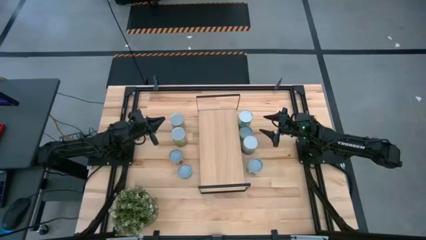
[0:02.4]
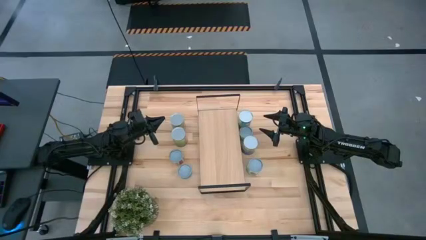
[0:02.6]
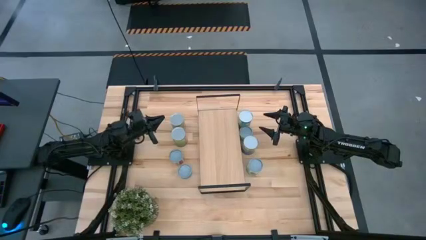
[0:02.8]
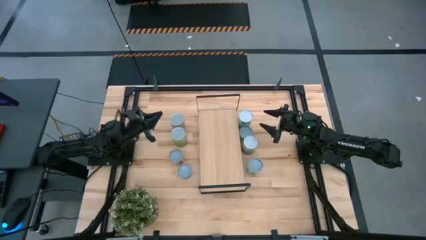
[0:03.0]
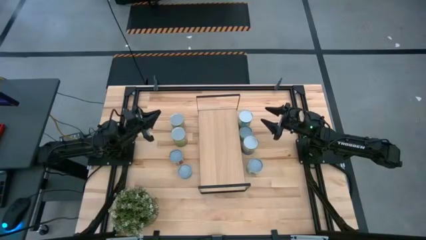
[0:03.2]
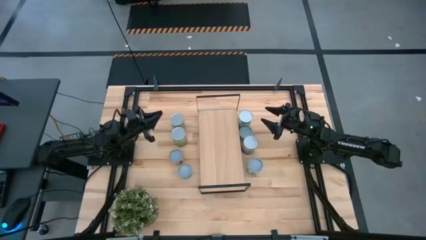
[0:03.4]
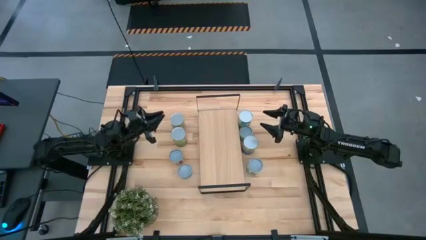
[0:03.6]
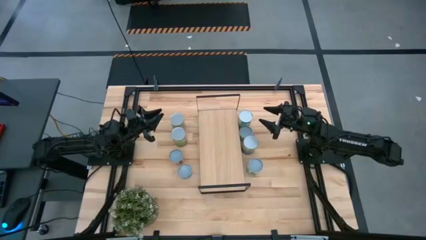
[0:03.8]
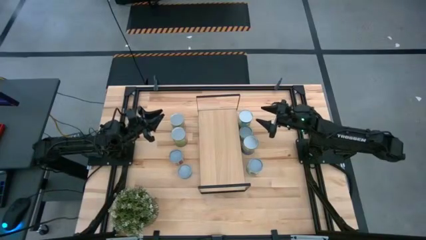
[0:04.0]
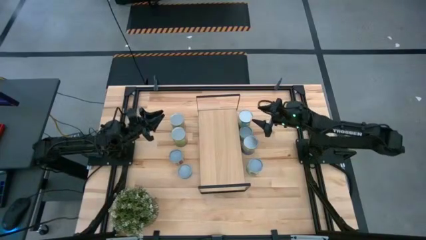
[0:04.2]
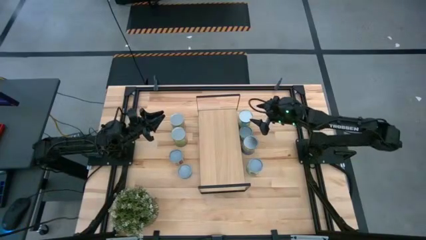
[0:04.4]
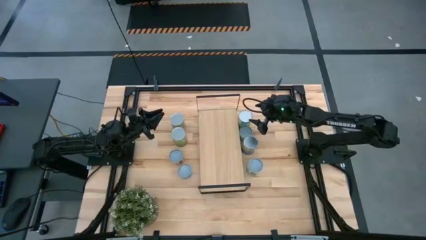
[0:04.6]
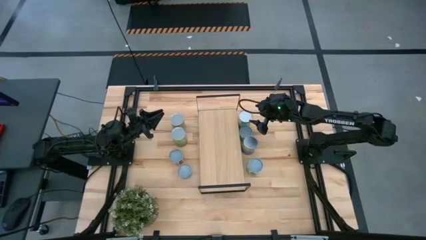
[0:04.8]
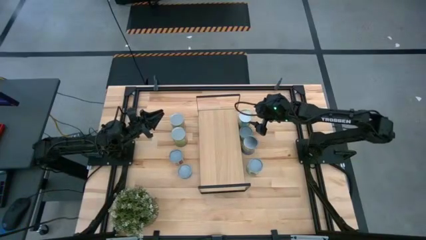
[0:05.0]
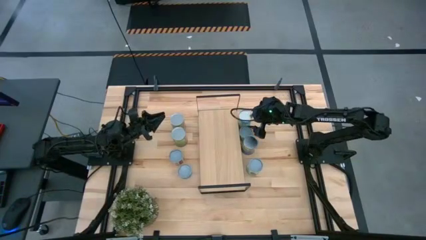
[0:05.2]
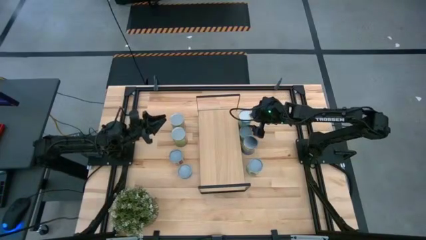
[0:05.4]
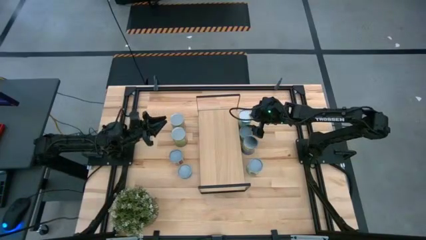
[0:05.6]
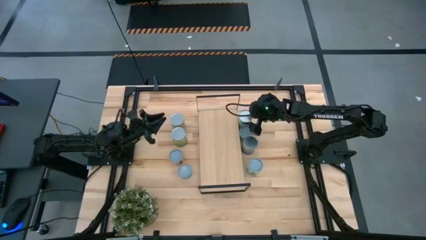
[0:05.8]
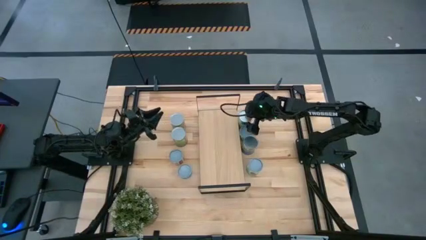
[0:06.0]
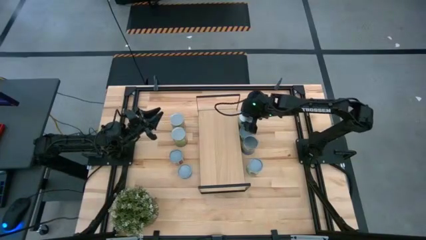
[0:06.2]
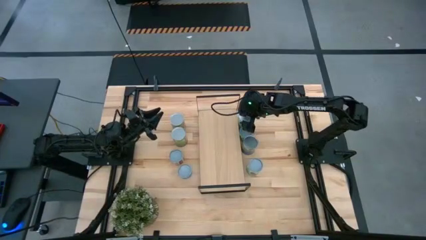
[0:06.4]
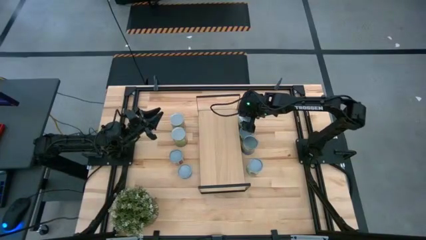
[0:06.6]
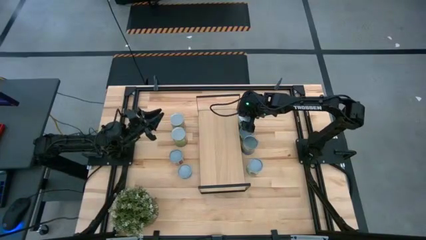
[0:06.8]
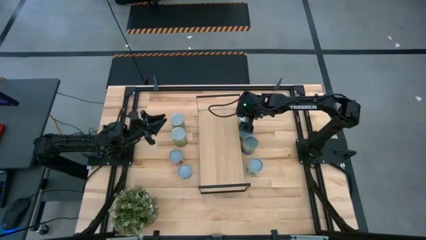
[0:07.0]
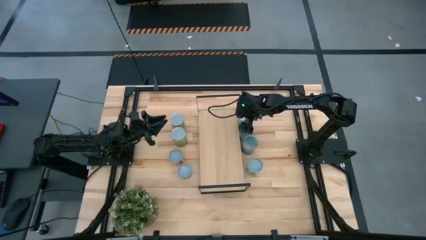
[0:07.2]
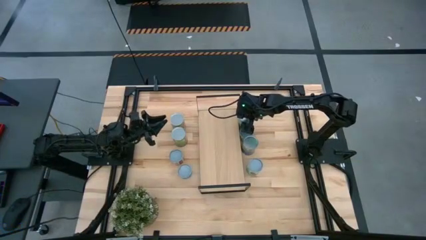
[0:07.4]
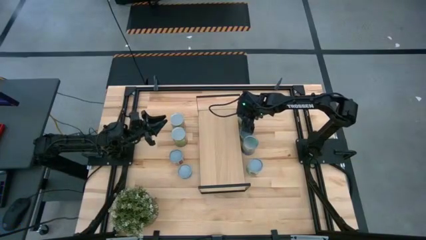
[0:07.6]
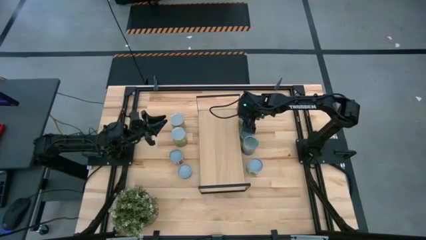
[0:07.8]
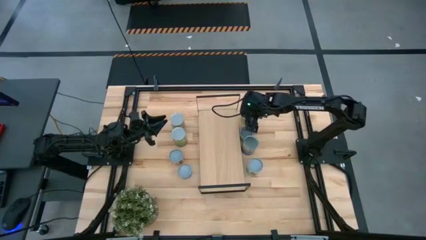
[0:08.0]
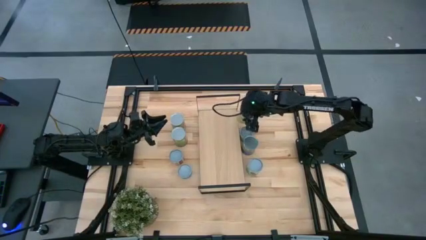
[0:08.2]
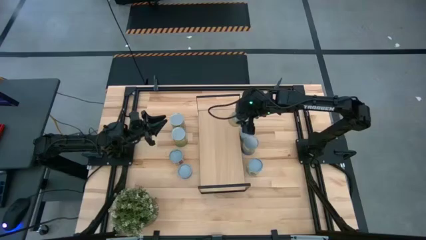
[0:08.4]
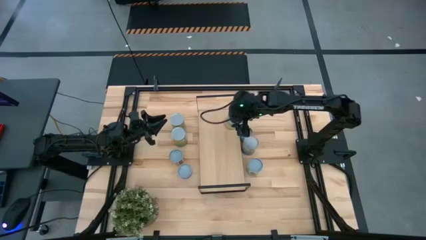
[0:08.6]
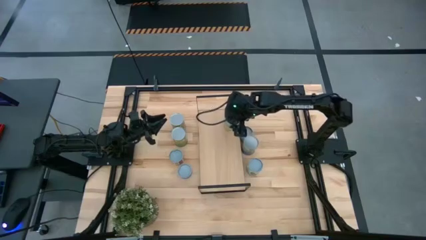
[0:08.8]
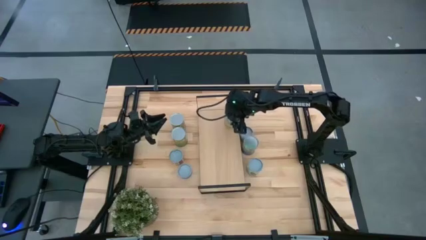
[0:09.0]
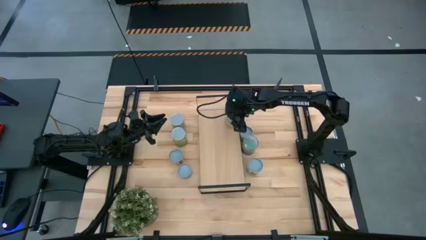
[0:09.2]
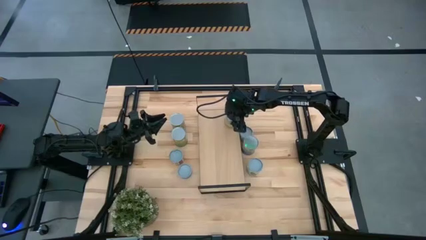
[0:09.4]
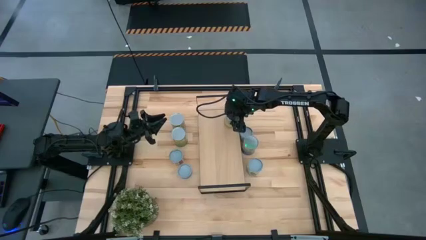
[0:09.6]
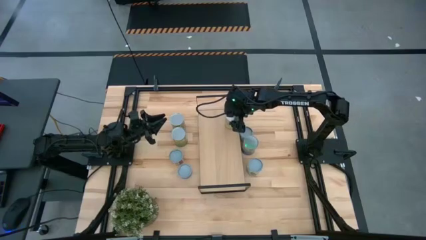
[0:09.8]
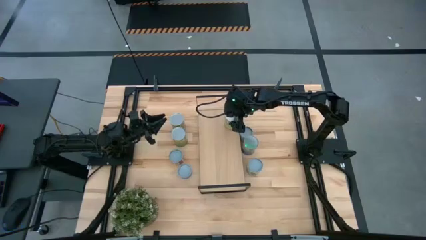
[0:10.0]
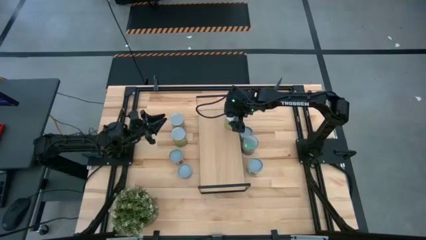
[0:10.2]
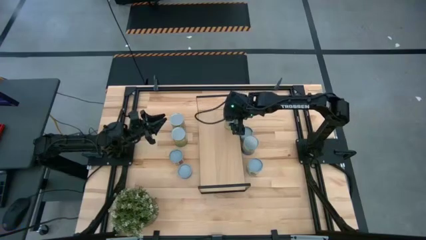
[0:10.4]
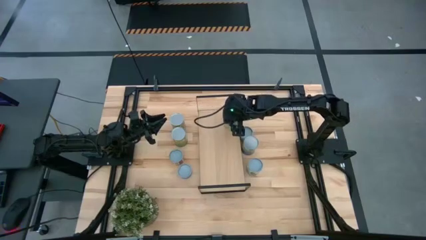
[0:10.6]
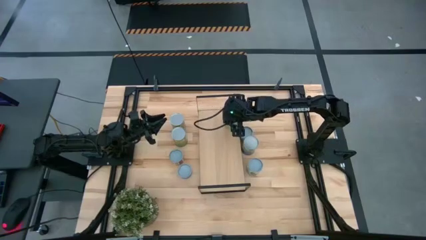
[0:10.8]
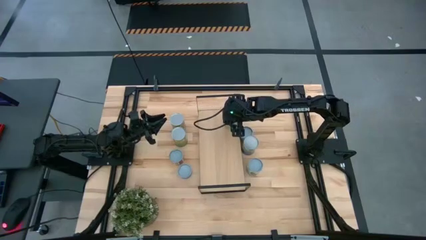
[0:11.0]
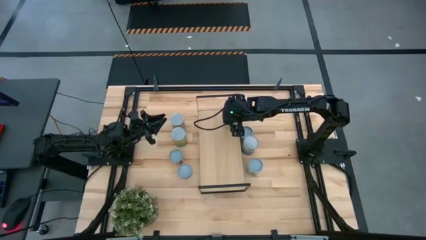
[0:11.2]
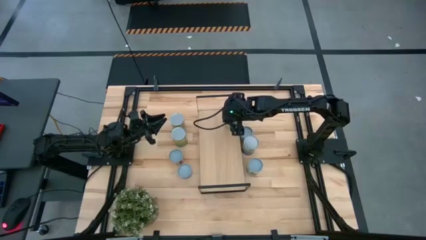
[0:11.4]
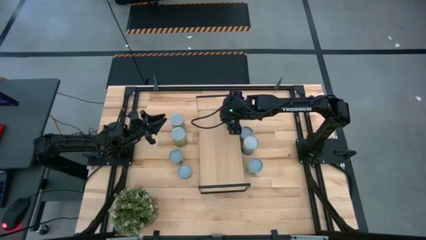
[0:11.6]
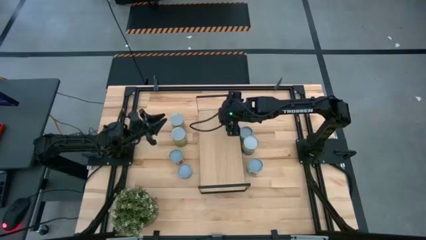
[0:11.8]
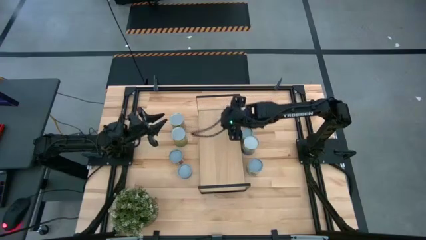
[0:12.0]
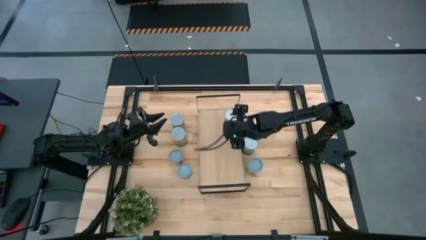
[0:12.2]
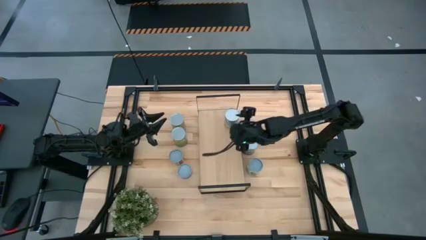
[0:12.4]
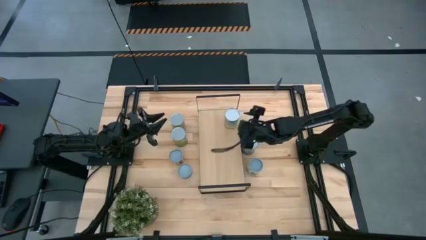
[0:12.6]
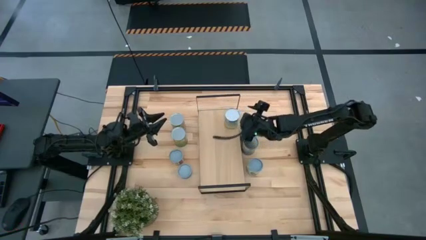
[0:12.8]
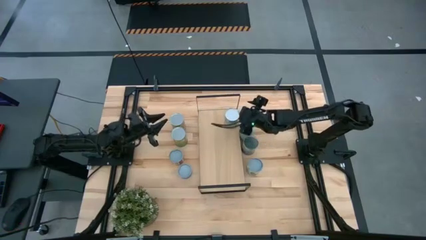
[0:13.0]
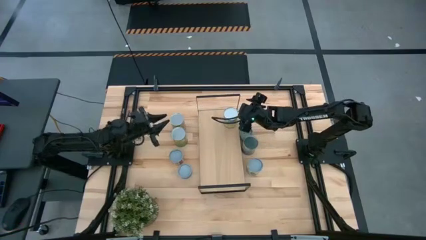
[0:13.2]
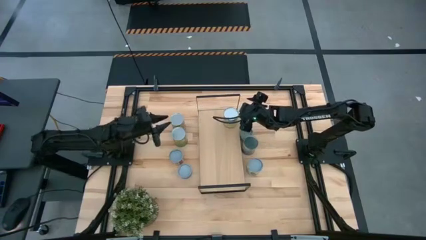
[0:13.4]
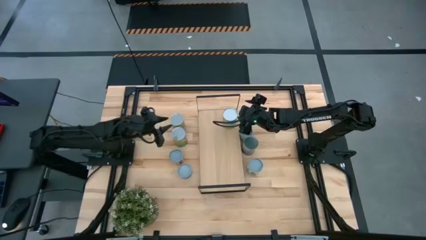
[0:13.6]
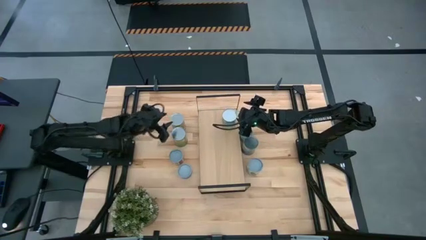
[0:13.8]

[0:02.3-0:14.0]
Task: Pick and place cans onto a shelf
Put the canned carrots on the shelf

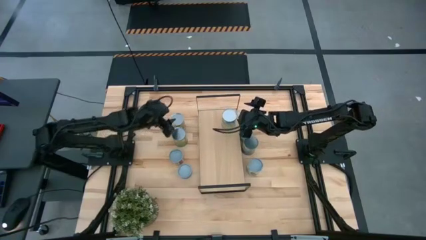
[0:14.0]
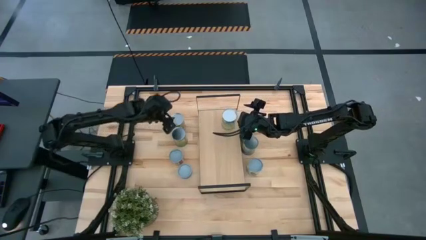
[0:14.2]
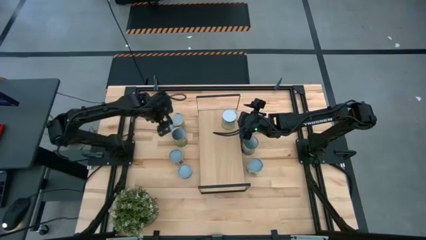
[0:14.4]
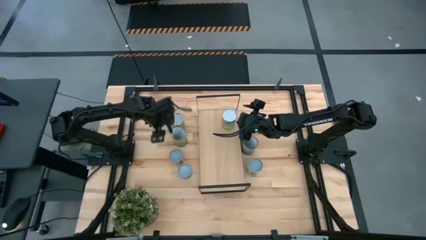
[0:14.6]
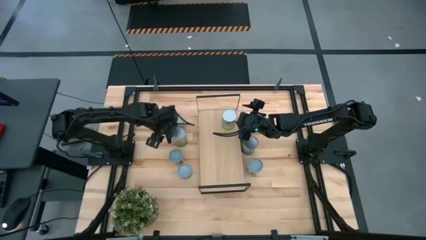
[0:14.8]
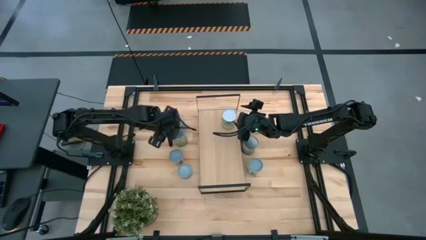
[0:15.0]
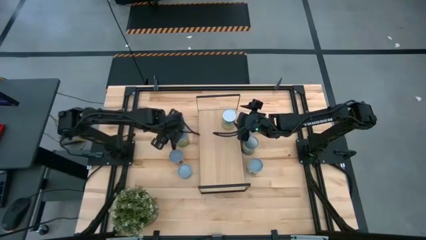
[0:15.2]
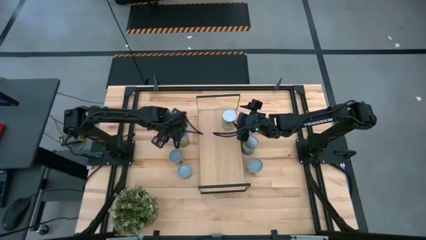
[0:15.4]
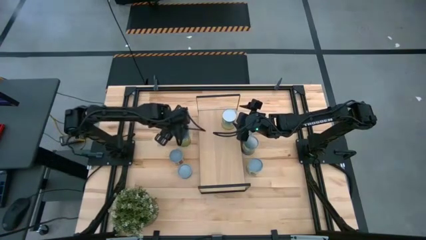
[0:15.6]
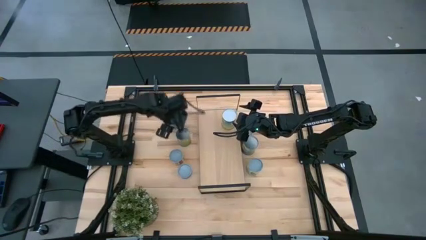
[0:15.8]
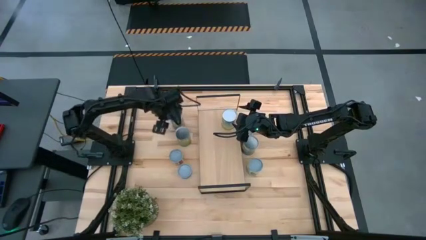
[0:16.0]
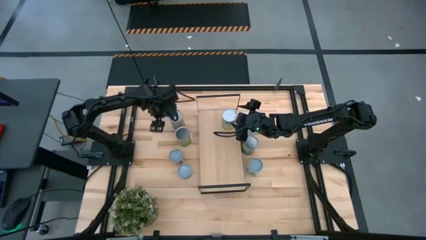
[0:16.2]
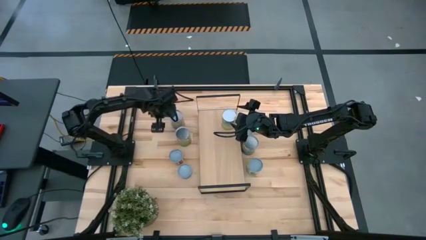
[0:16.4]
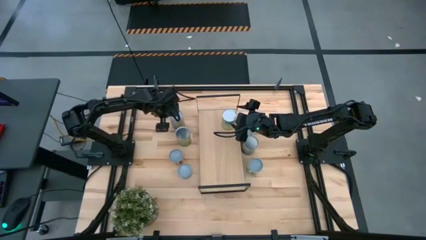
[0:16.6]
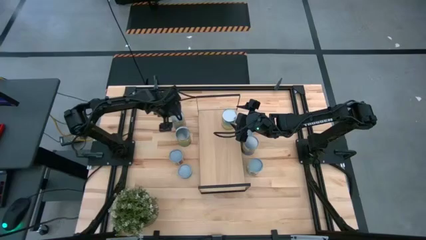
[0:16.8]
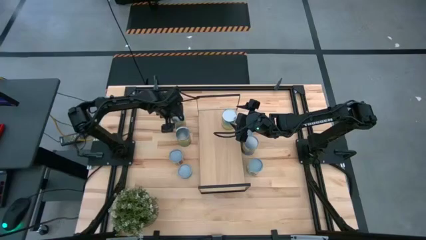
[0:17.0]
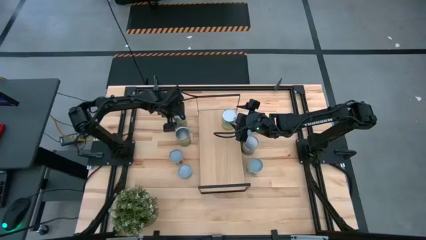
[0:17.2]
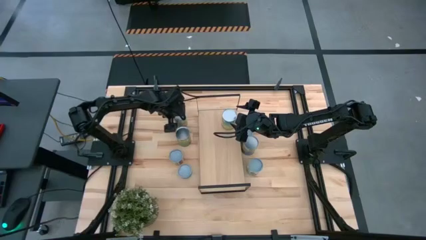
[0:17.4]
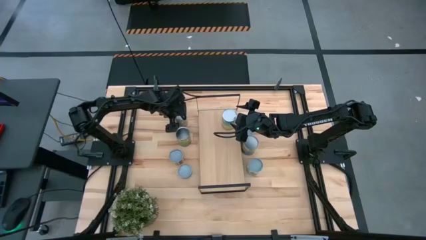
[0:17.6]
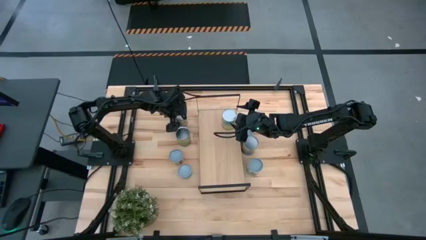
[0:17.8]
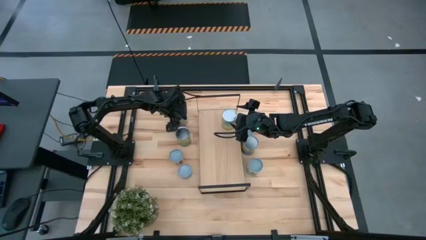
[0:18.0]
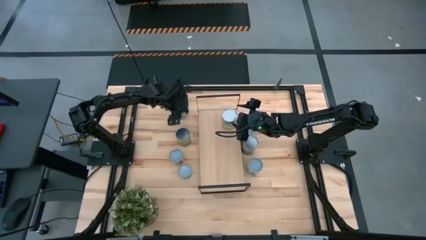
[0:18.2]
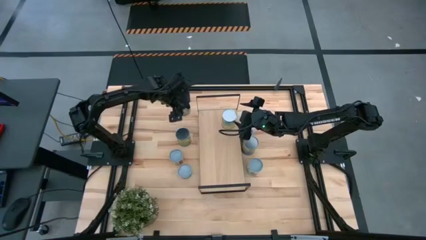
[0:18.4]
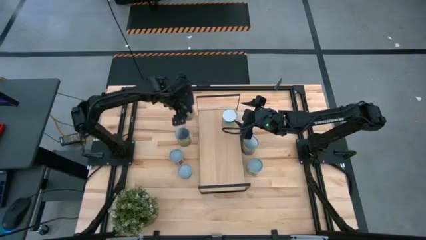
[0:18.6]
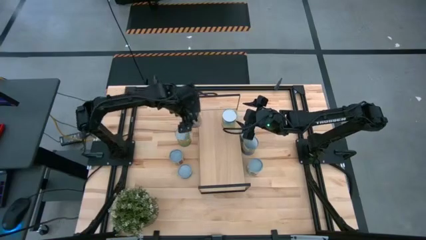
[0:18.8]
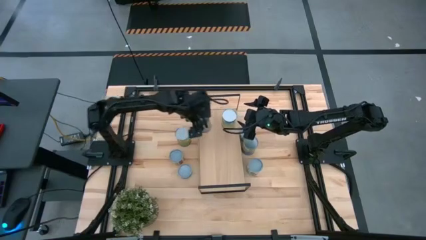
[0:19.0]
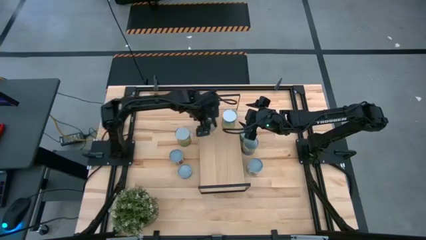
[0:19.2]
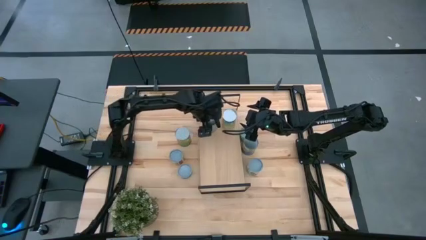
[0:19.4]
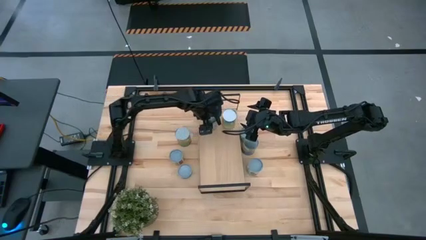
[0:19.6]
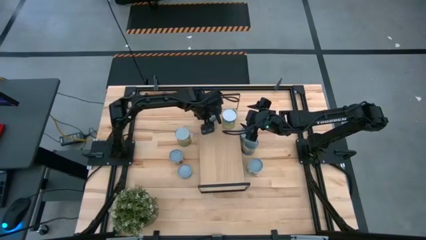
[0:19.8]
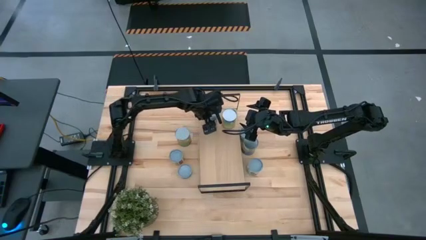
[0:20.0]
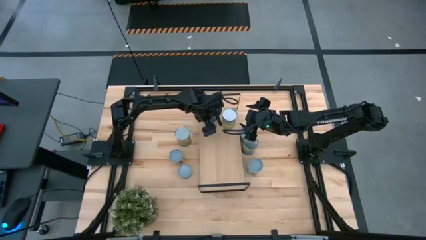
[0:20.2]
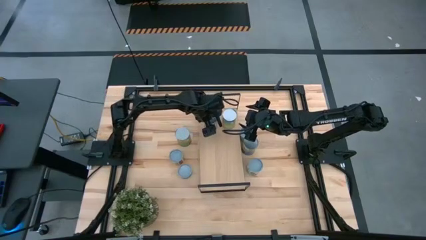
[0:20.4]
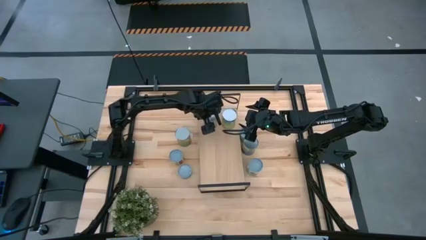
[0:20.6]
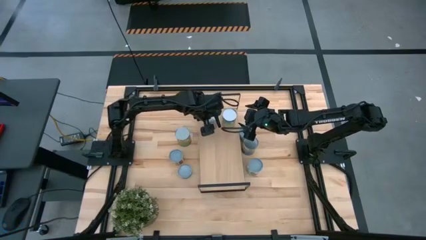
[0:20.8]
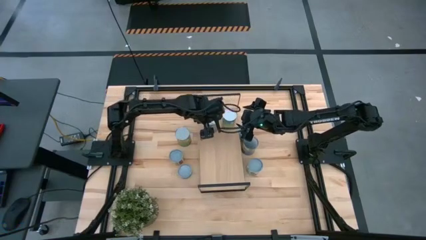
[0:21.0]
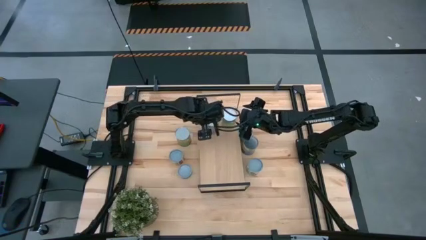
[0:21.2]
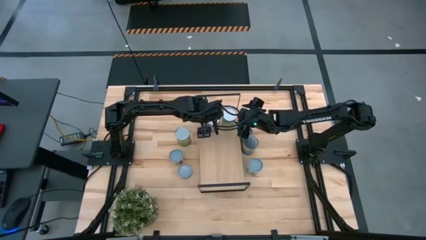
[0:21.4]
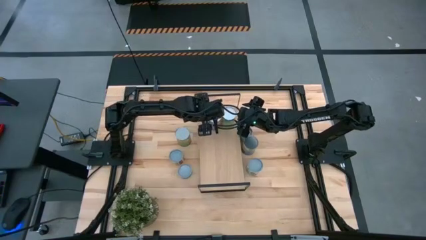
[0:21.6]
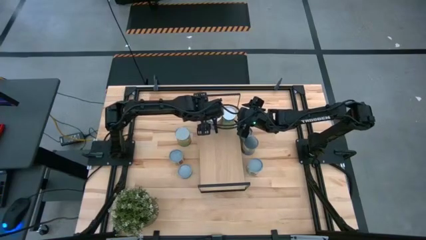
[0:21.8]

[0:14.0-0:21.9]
Put the canned peaches on the shelf
